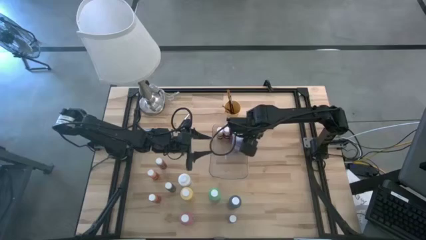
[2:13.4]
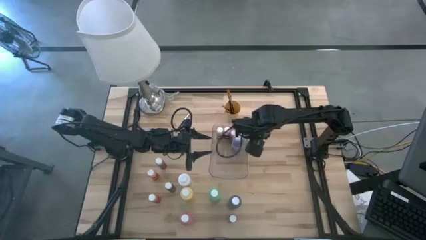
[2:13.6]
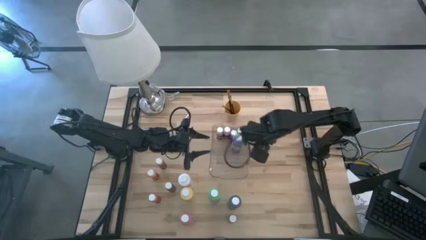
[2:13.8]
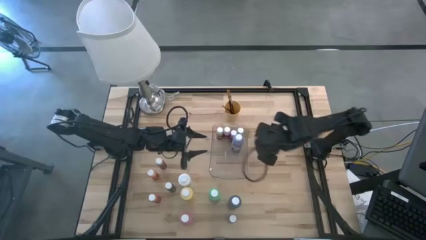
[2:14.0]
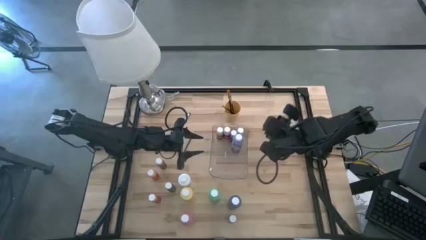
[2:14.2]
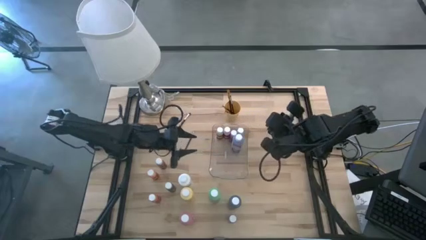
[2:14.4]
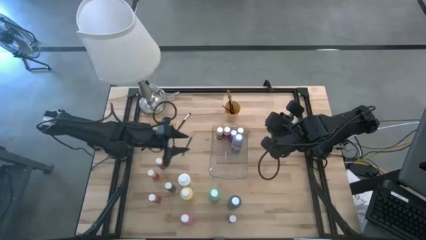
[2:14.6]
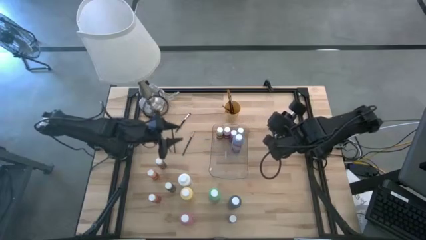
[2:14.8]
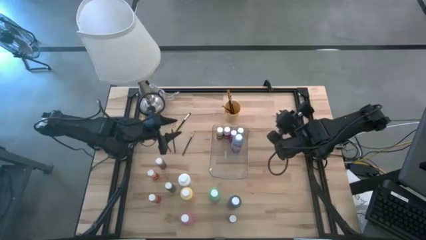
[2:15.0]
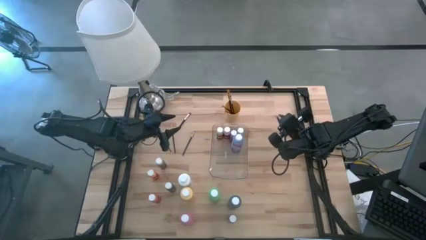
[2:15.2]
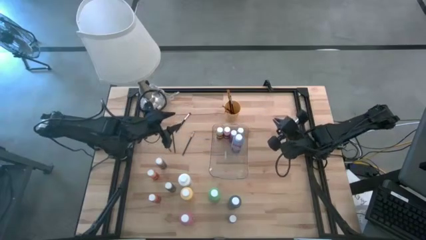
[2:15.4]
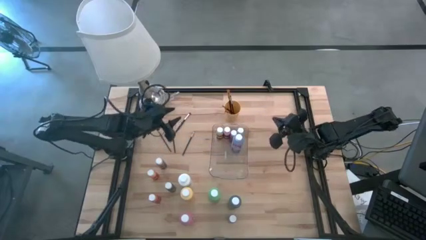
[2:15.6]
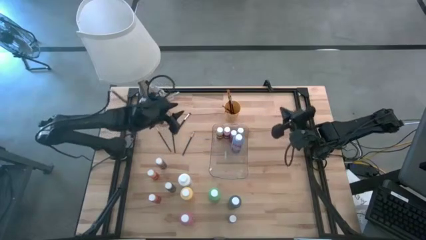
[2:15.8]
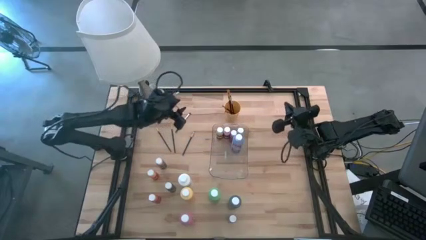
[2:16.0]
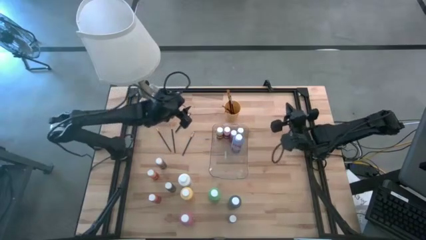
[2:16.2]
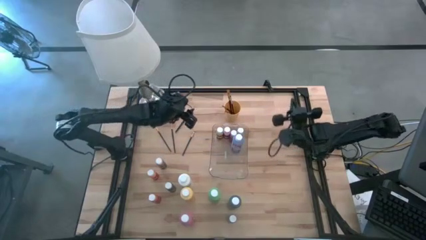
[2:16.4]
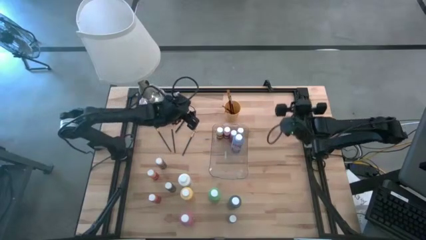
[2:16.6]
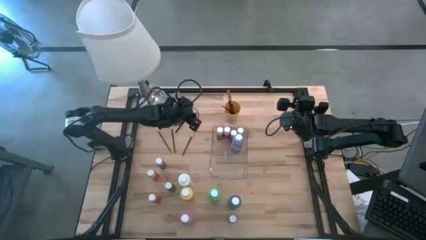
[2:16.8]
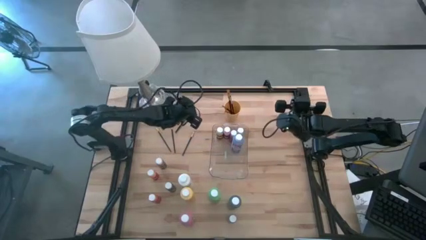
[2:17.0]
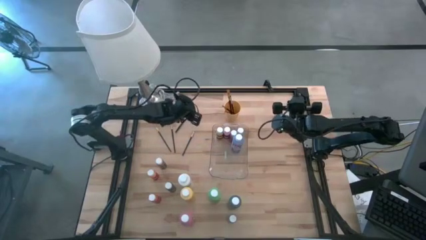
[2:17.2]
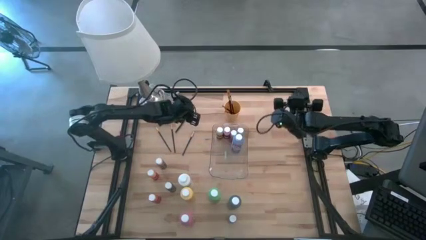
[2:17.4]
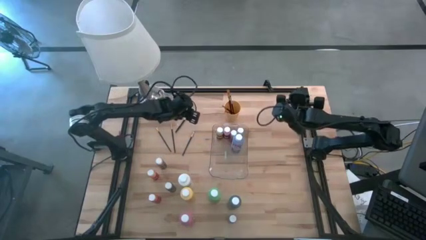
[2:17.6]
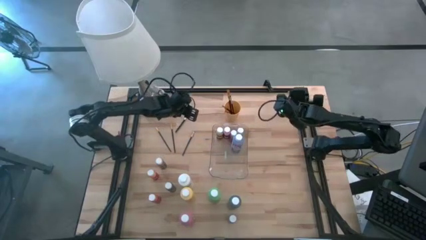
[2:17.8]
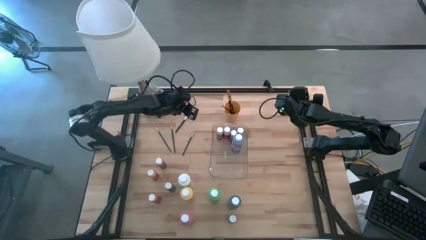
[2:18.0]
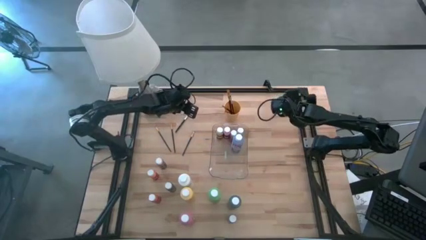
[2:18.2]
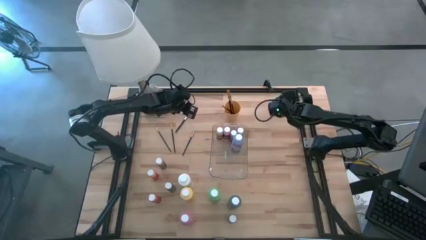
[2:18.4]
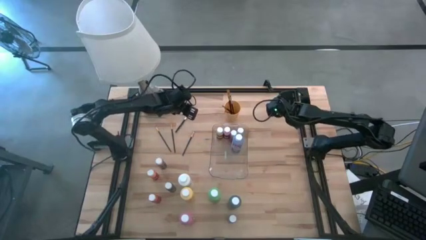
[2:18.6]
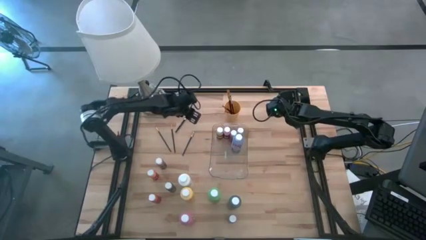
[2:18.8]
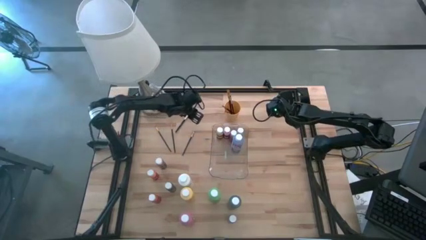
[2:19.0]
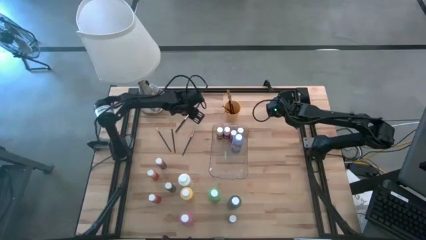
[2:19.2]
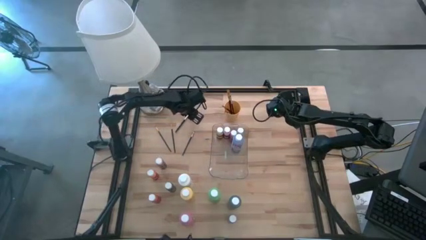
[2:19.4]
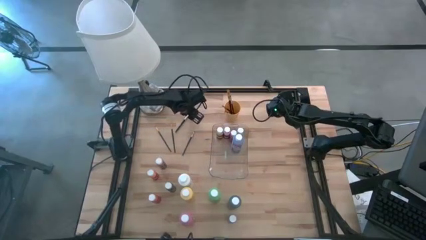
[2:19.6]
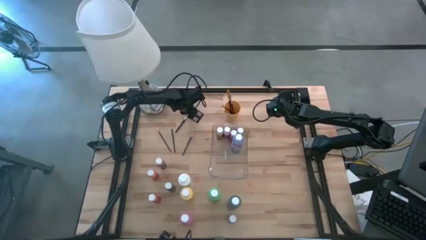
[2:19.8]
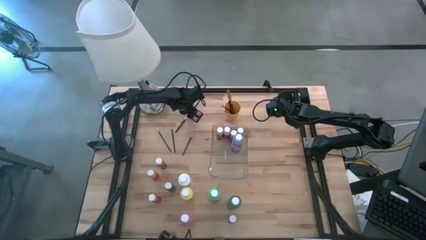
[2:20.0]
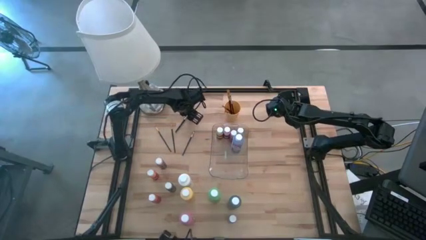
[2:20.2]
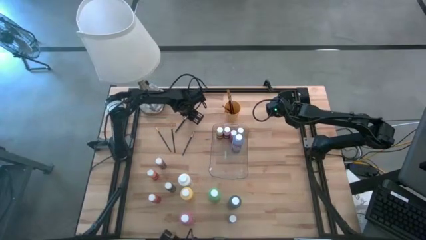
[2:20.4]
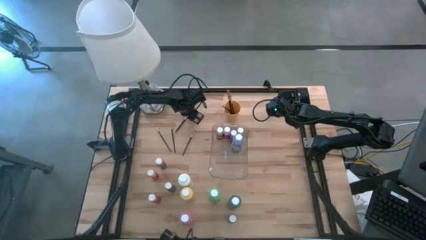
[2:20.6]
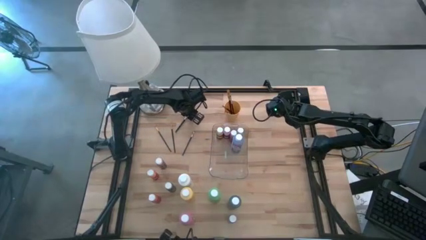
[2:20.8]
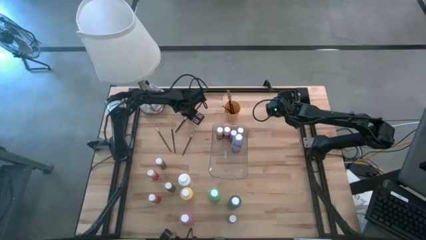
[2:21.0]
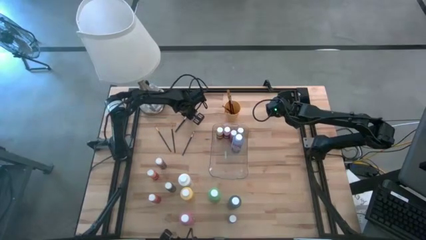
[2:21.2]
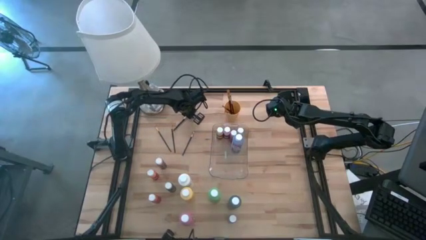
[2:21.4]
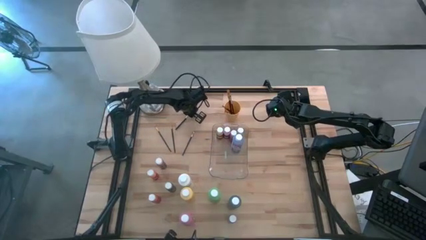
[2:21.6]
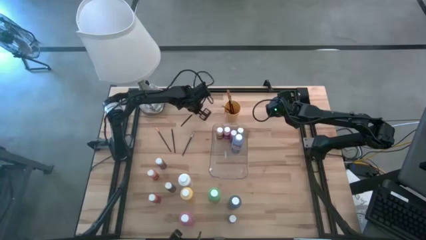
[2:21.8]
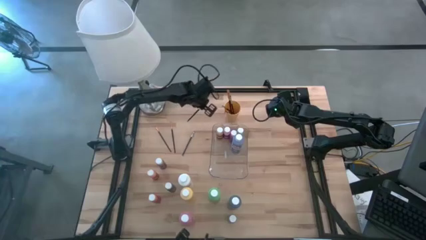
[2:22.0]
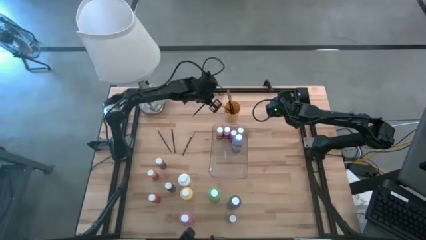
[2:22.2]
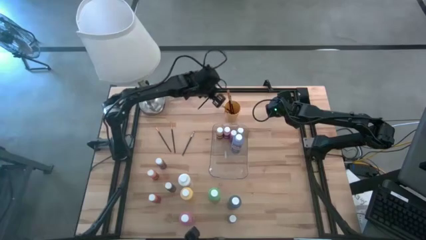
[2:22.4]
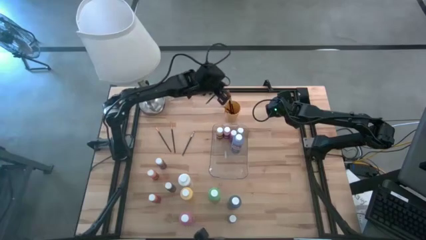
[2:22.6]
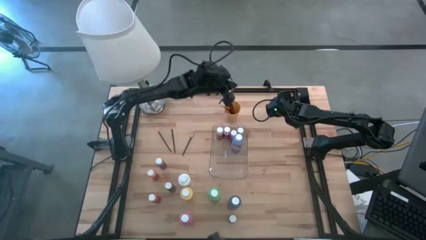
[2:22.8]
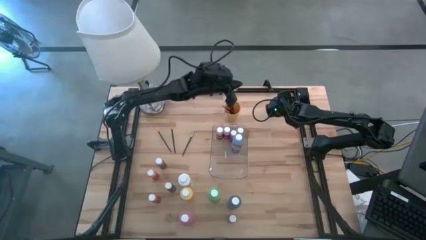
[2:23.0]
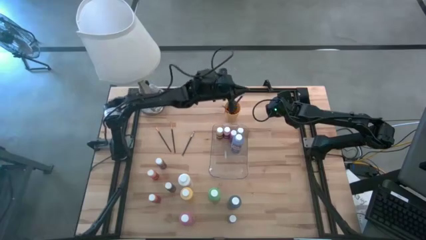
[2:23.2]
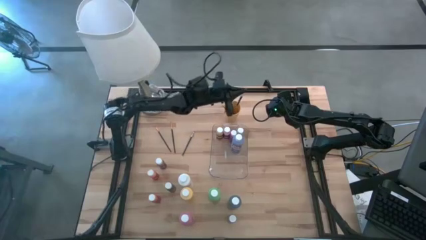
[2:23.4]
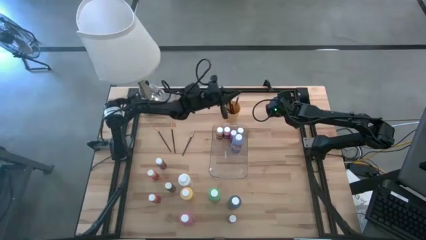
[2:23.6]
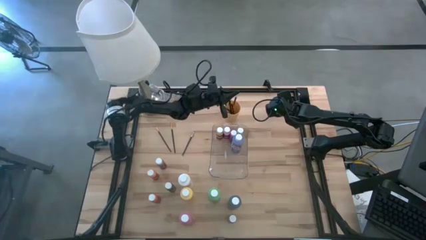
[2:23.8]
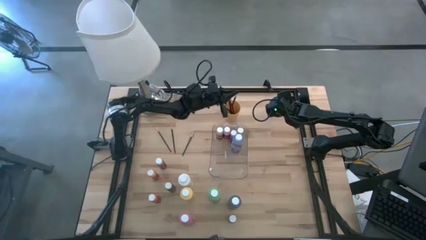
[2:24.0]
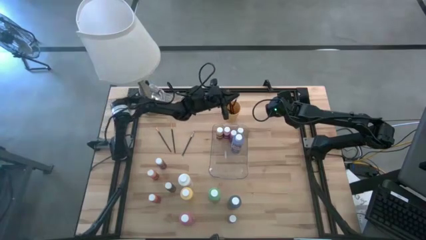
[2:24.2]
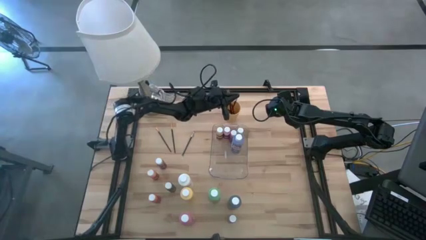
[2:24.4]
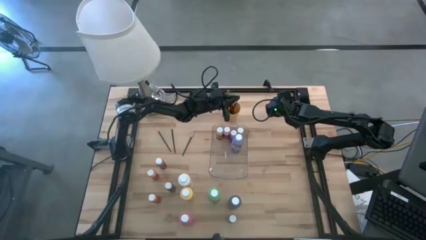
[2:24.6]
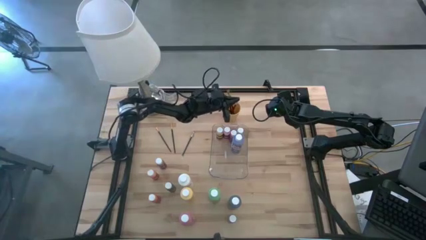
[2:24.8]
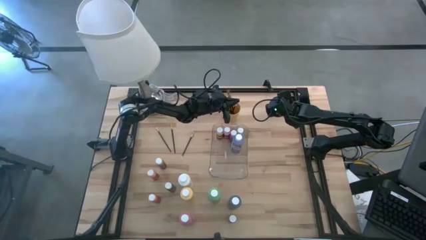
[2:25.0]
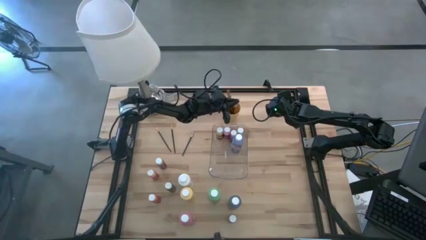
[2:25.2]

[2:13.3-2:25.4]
Task: Pick & Place Paint Supplies
Put the silver paint brush into the yellow cup

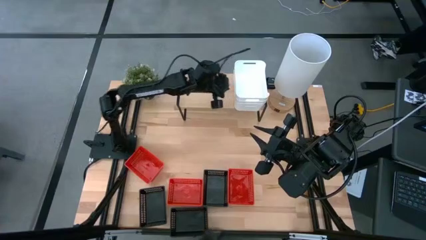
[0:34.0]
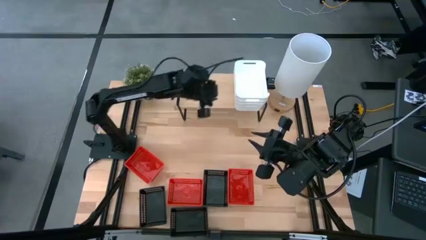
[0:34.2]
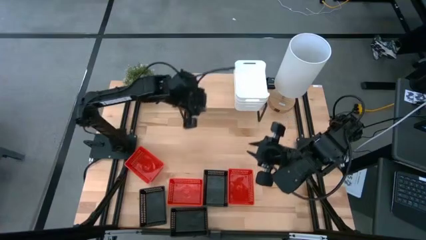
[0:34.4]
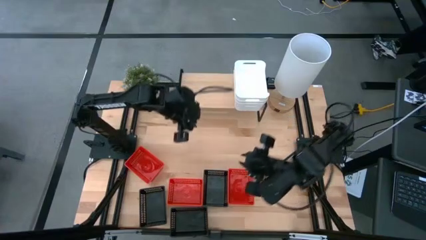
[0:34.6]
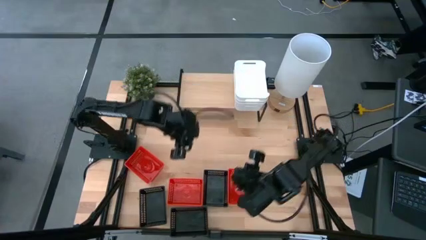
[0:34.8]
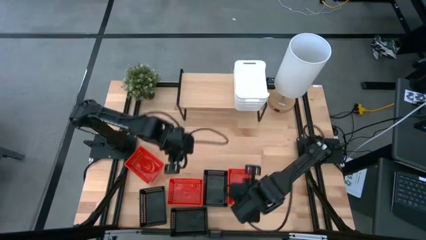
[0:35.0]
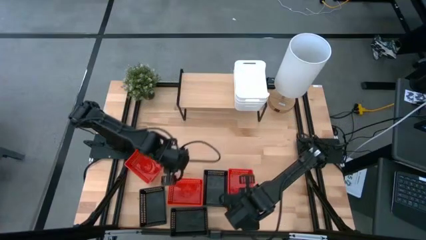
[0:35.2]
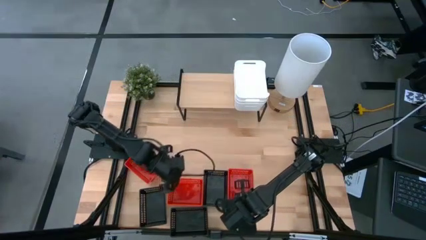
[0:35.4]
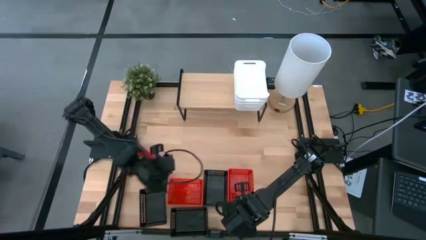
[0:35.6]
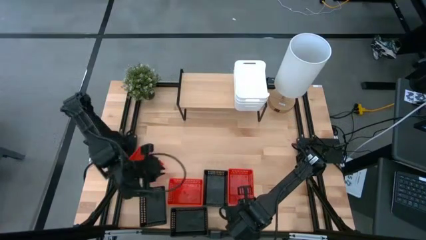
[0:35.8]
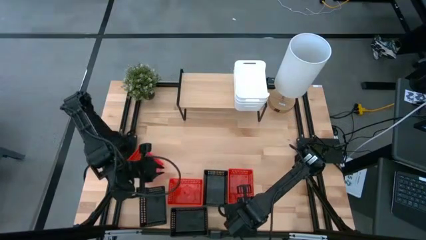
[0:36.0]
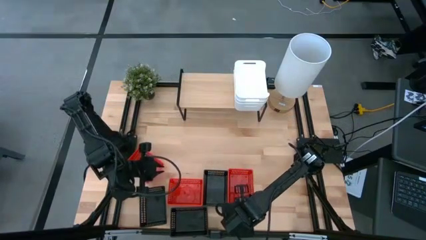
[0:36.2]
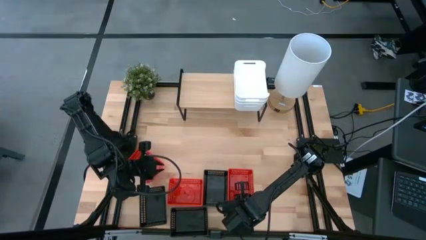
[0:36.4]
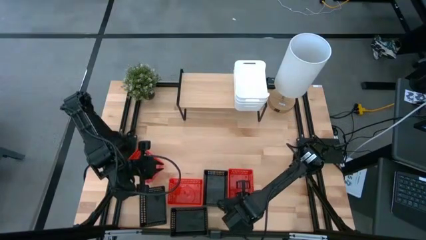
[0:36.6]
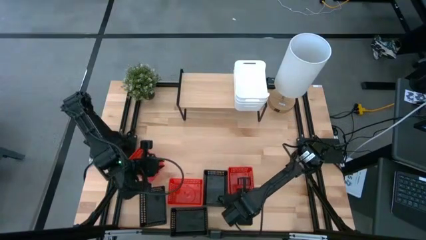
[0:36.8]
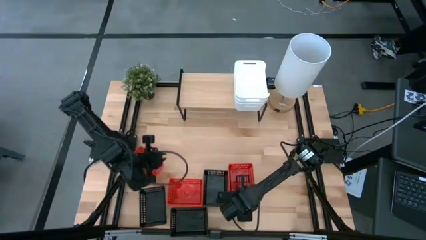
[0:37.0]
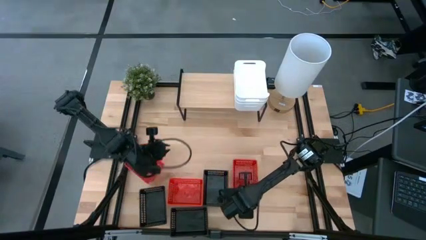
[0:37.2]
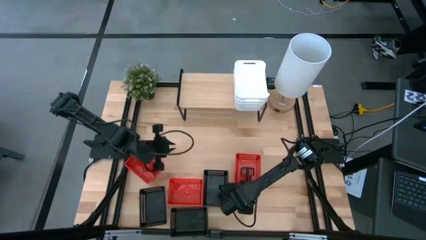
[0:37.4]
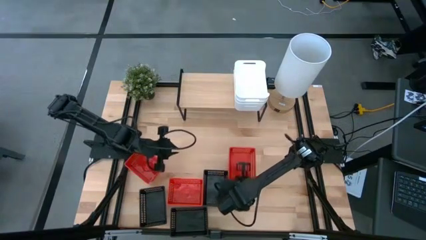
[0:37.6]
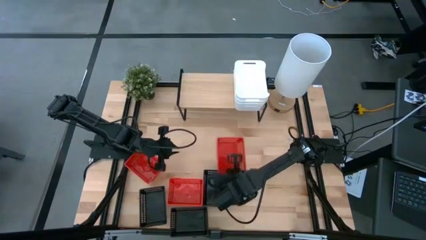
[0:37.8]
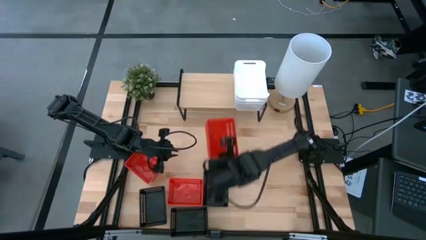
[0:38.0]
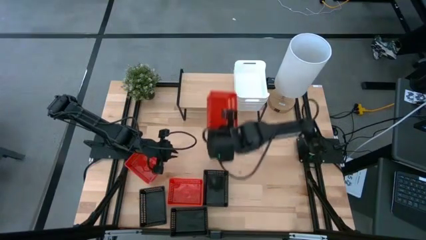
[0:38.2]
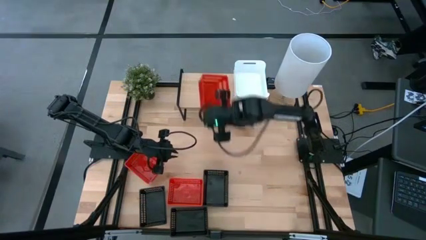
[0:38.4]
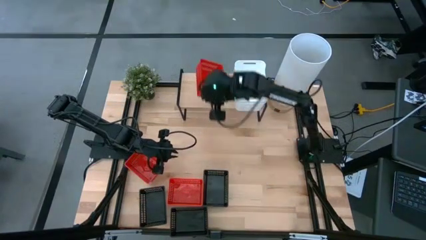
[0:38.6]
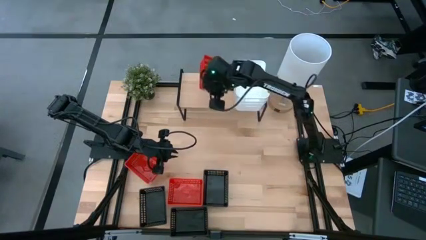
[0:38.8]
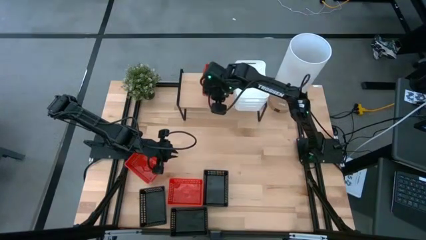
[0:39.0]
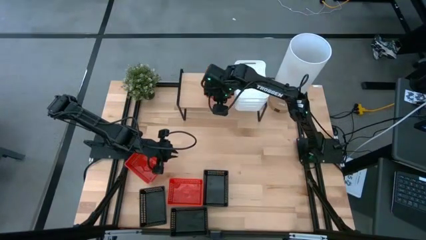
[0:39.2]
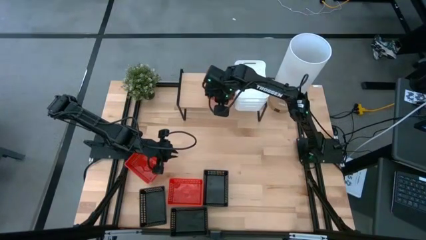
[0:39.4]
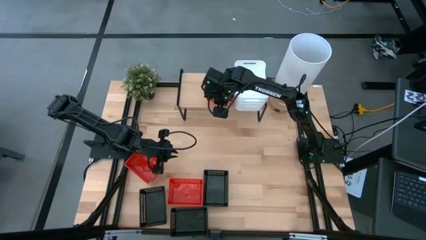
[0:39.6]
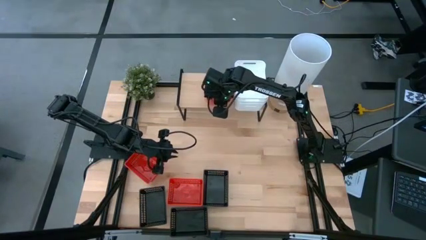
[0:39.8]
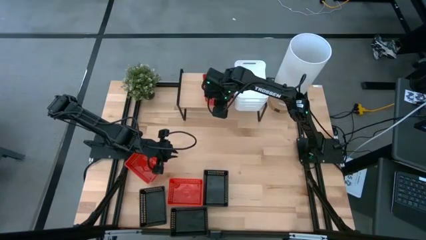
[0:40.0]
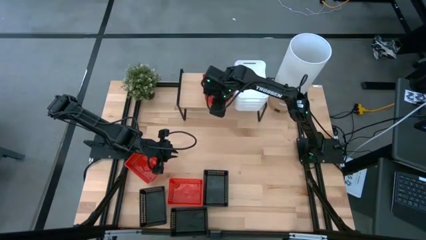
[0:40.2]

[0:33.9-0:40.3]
Task: Stack baskets on shelf by color
Put the bottom right red bin on the shelf
